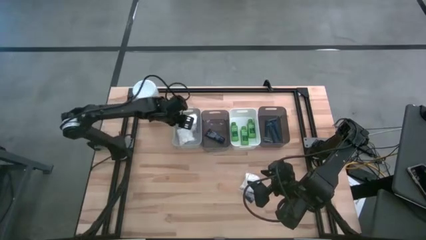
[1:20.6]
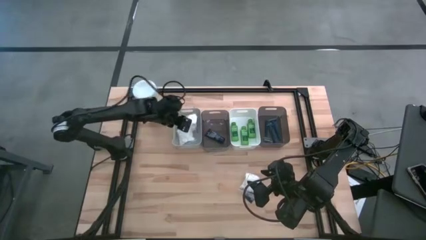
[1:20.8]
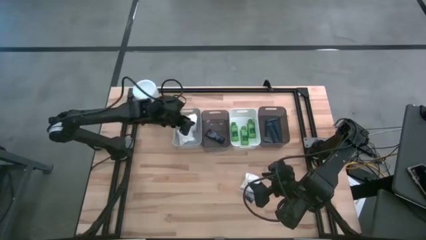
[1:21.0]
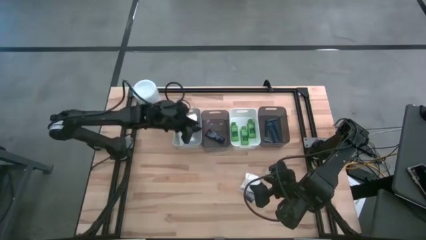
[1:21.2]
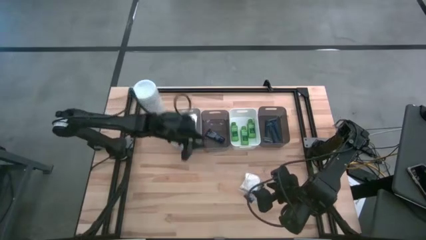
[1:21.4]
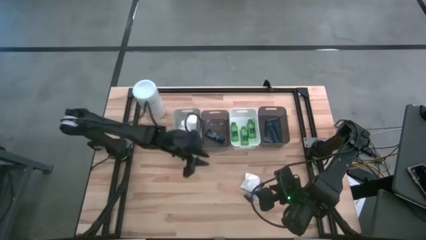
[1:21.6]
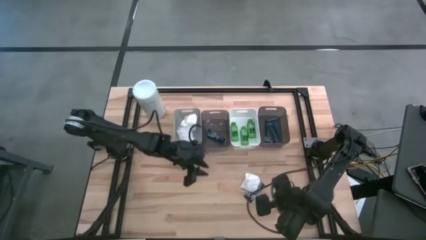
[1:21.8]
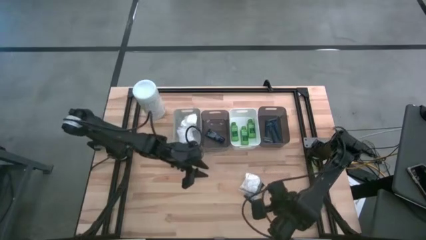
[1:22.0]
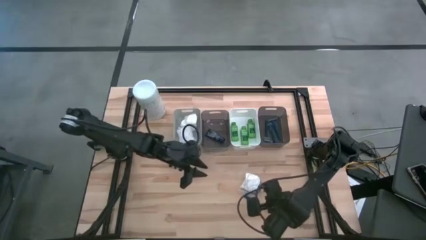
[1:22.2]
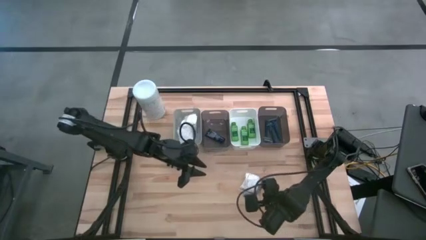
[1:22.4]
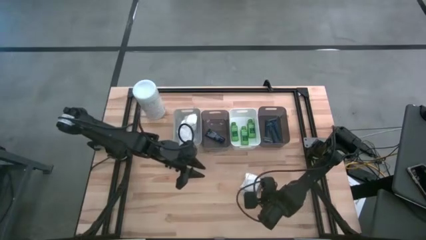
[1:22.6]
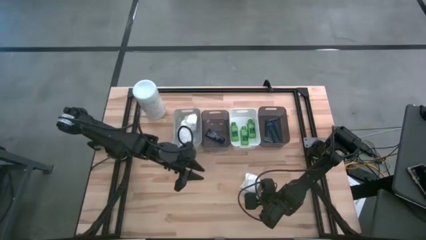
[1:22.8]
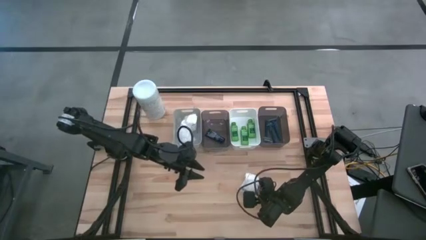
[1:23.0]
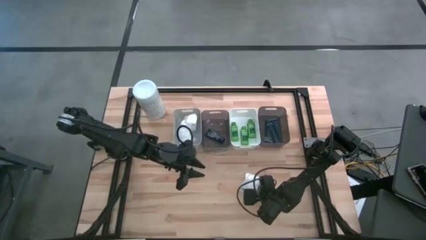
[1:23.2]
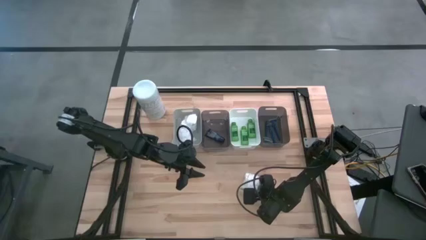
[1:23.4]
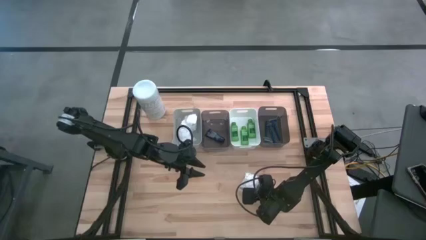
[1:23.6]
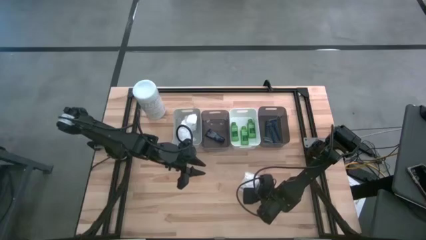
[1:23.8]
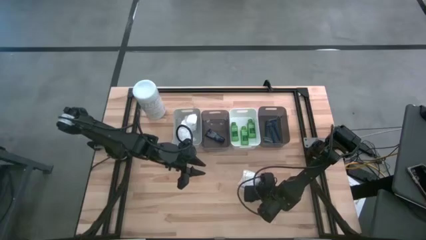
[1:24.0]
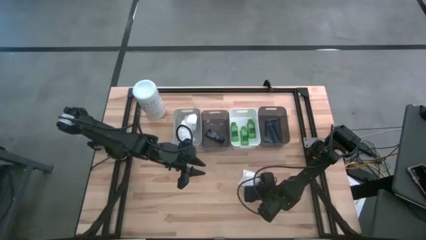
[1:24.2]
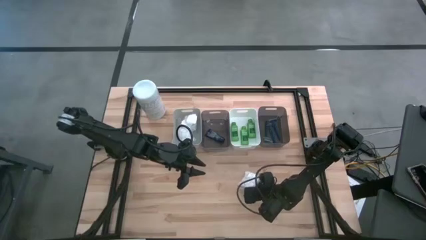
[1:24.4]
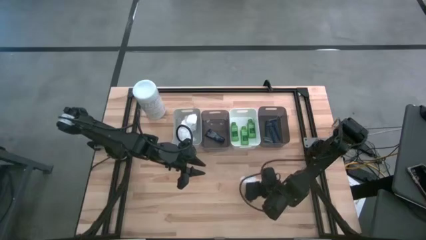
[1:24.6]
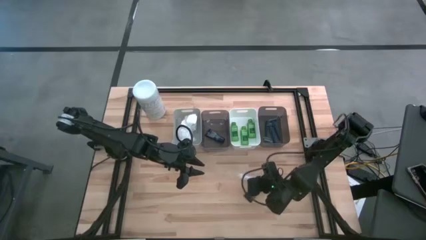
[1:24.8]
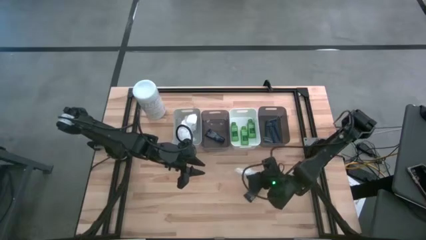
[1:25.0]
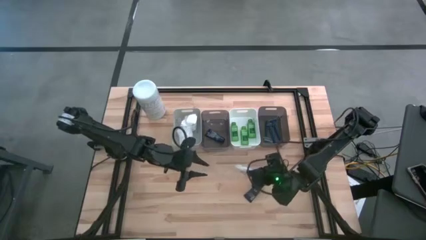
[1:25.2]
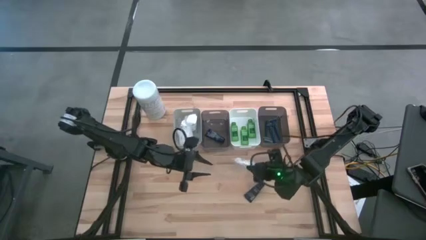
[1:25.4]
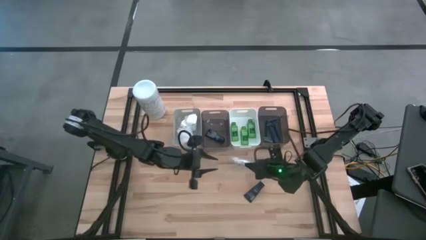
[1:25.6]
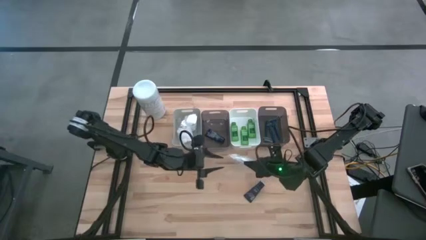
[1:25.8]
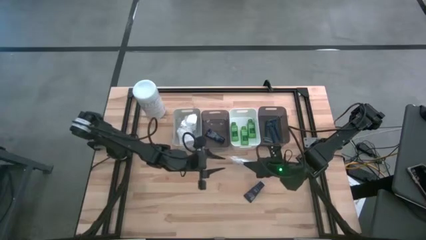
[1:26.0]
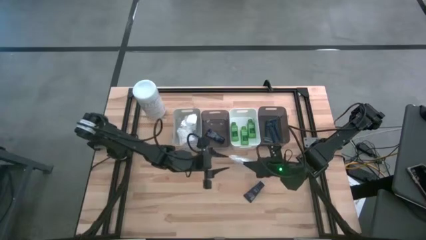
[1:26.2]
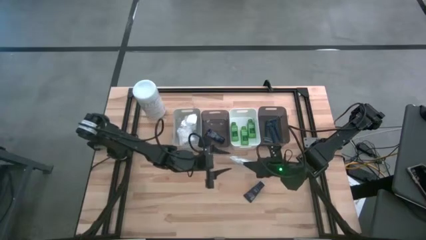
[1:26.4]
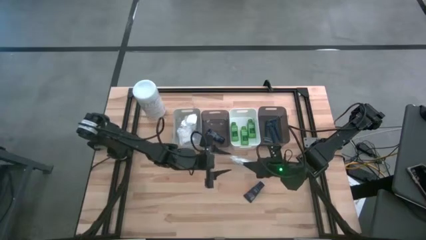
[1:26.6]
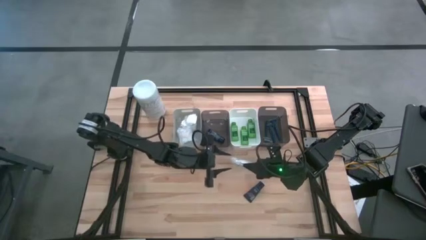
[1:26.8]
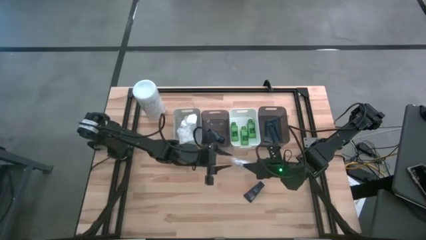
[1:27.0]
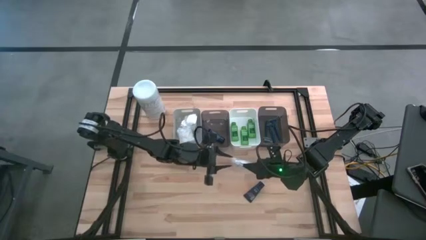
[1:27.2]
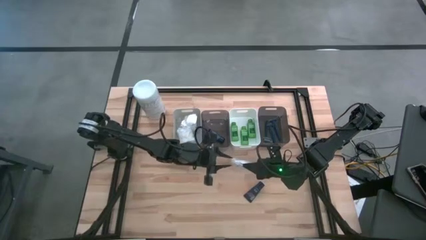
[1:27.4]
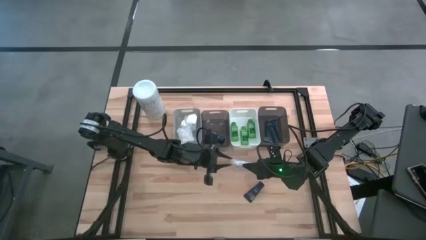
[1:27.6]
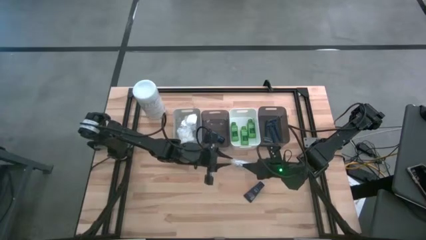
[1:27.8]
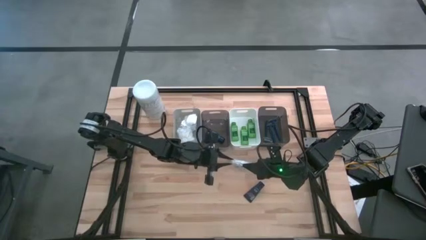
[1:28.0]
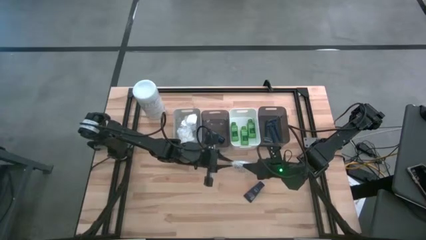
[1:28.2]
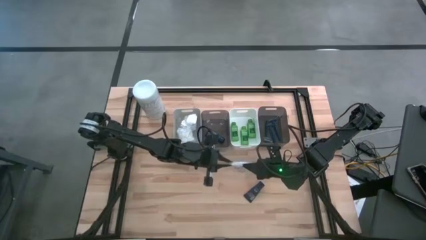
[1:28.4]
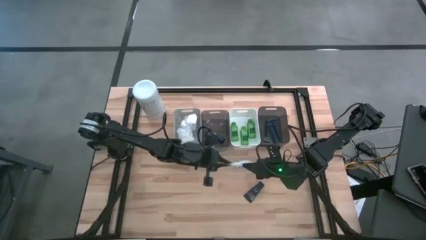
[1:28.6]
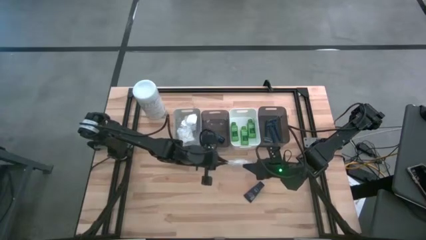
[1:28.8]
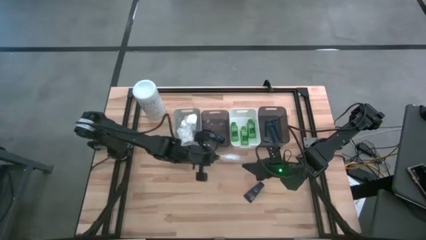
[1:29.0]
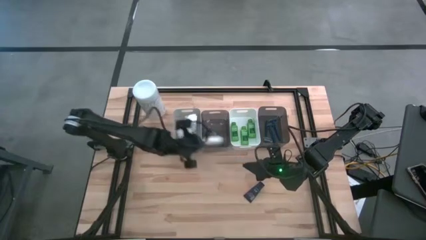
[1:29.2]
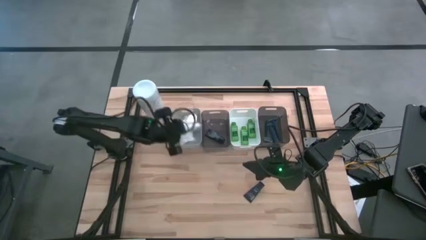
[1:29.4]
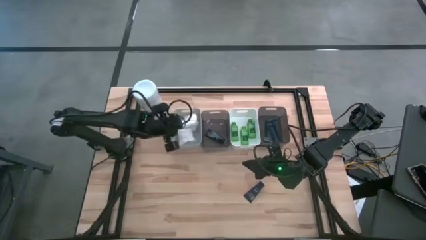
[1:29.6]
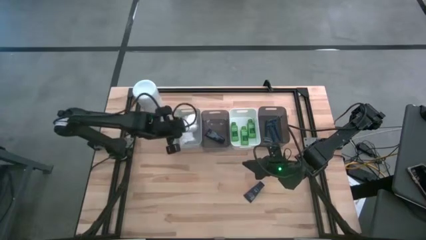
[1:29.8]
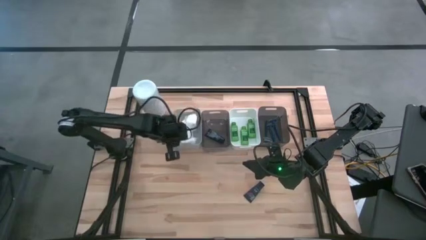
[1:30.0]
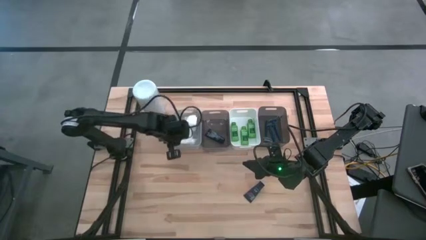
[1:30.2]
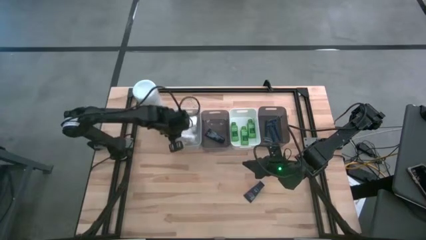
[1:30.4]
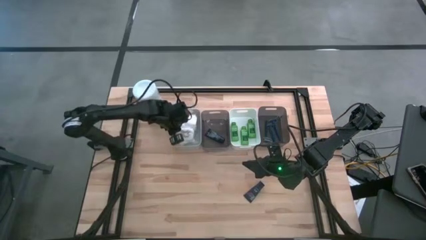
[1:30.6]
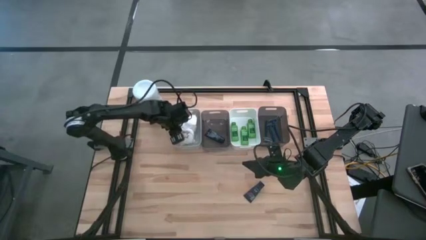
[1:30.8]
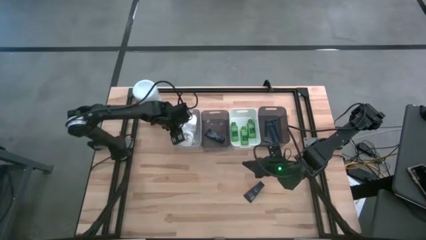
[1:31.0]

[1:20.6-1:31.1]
Task: Pick & Place Travel size toiletries
Put the cotton pack into the gray bin

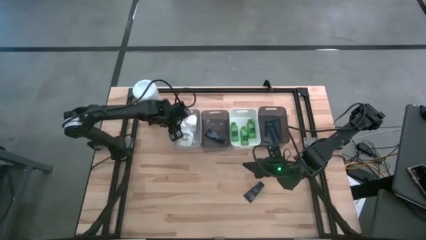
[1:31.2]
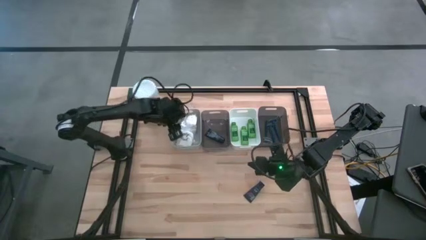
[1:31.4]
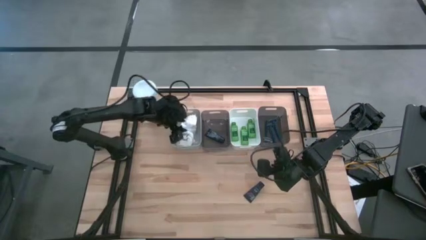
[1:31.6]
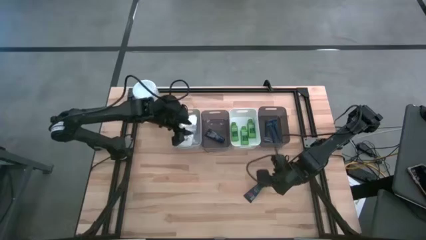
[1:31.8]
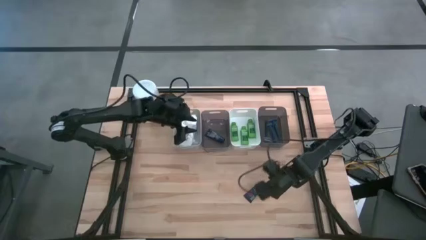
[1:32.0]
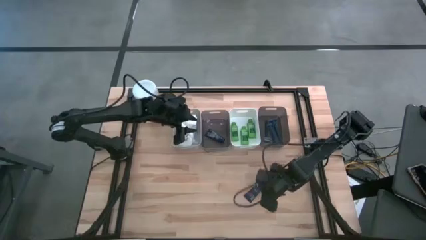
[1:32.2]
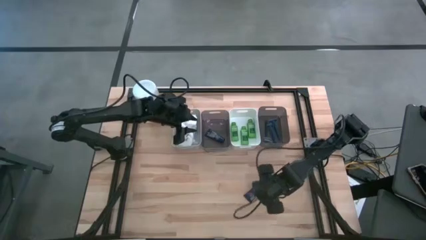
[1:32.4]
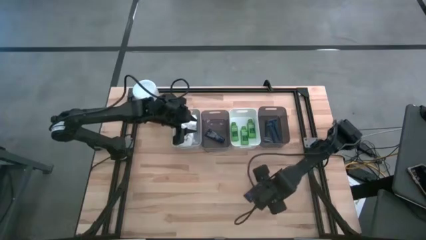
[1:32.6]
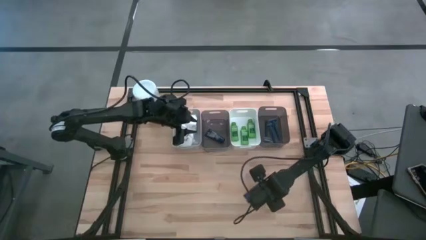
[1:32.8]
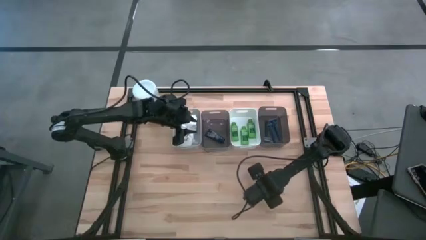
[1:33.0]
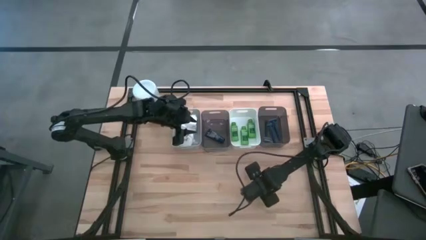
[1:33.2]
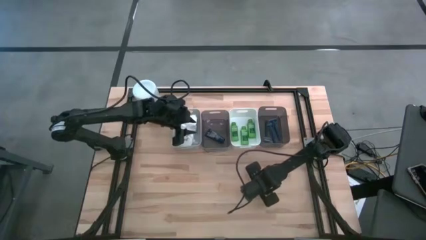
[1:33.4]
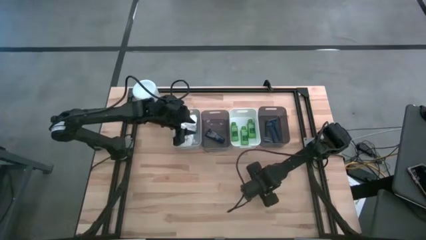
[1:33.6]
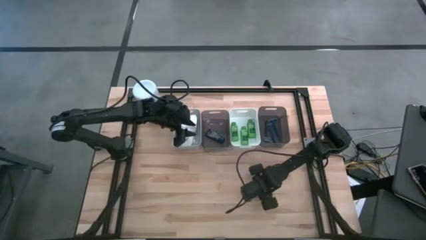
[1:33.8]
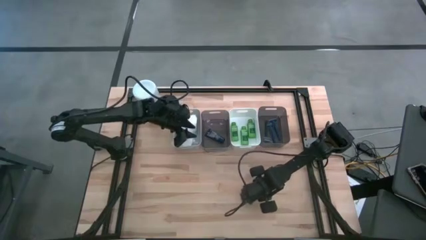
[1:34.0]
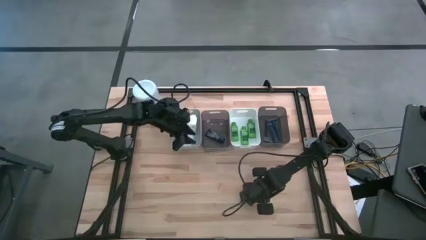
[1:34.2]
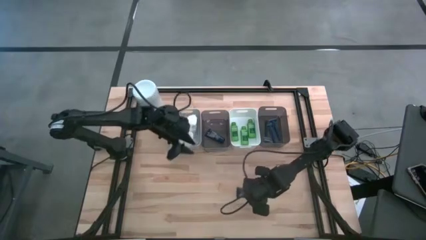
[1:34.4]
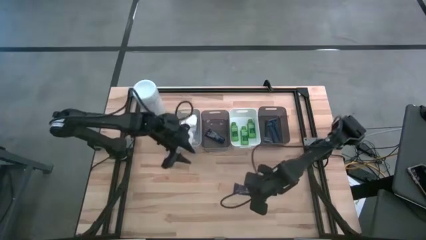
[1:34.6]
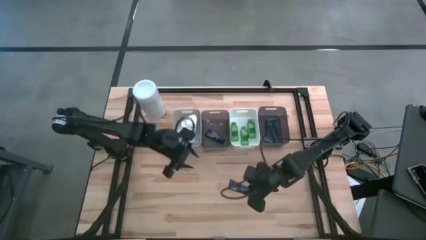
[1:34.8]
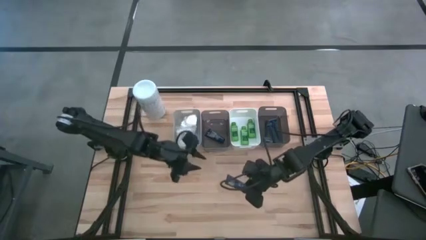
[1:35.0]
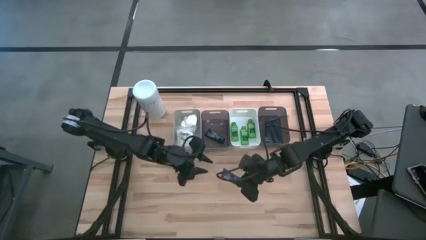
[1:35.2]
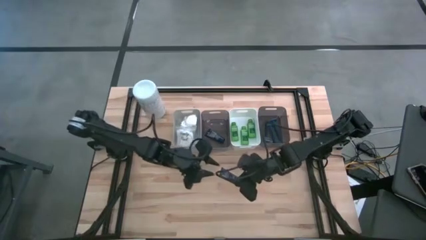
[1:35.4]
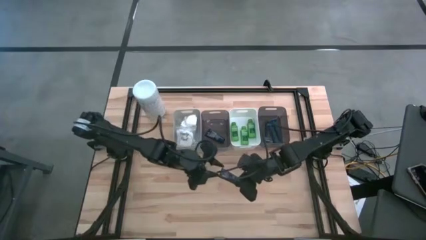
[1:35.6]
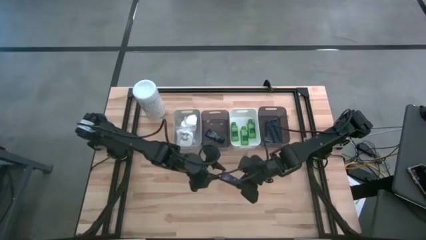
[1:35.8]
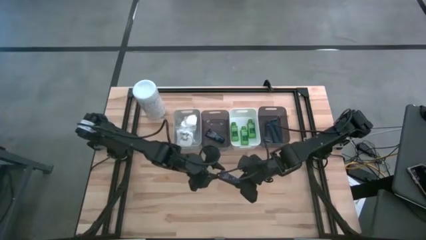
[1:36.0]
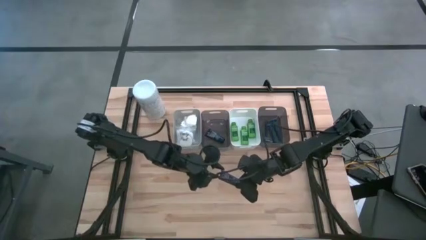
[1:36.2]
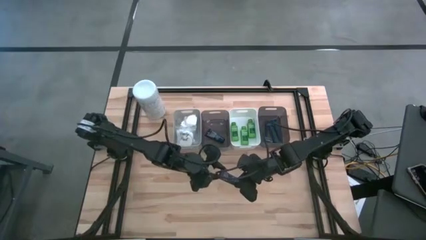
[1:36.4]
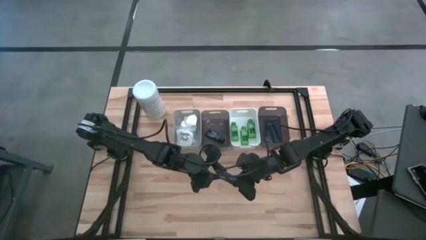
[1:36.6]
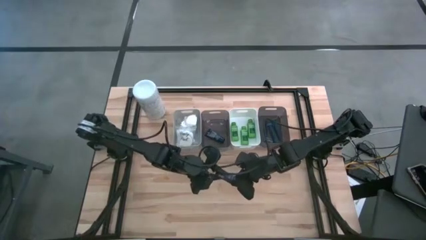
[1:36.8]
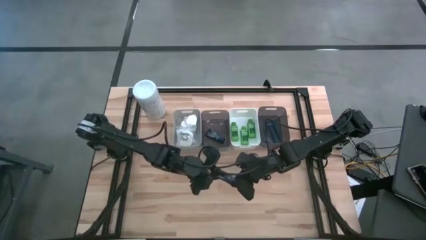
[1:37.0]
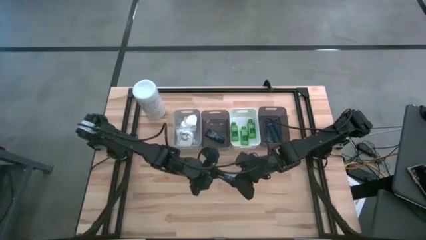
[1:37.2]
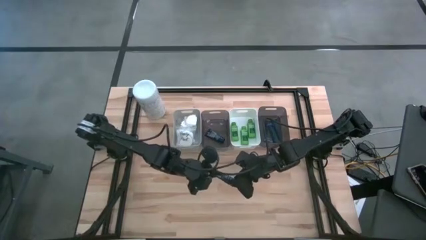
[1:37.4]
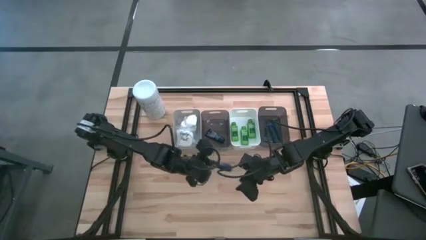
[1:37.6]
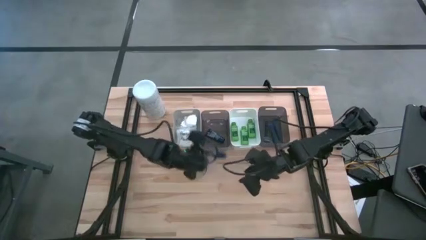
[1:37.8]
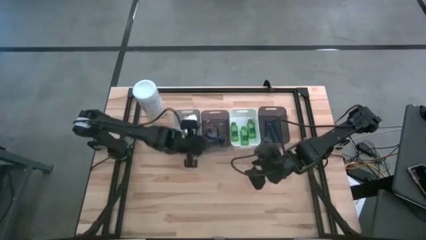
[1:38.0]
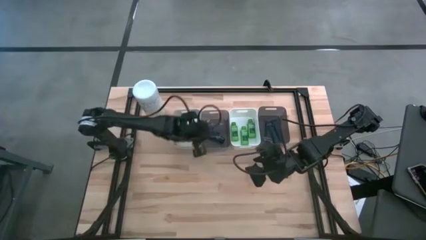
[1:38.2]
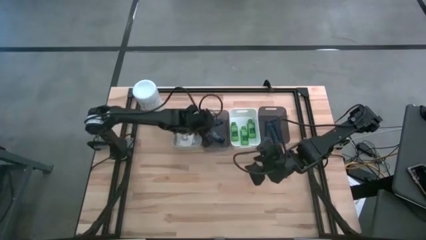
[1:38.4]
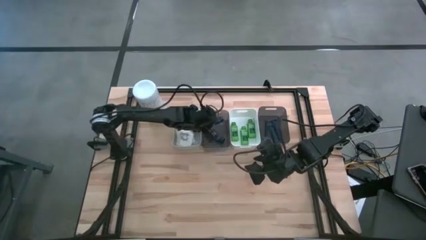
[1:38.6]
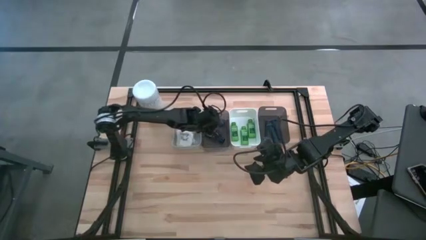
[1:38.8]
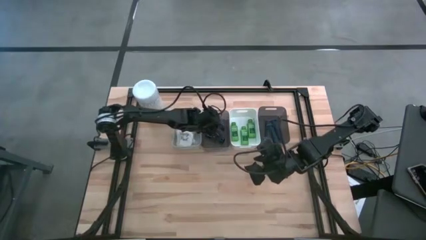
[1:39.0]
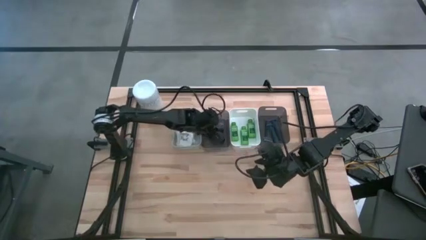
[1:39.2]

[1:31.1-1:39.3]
Put the blue shave cream into the left black bin
